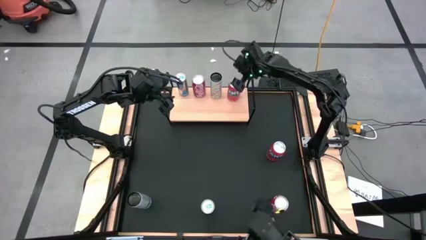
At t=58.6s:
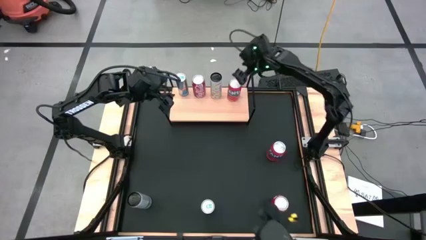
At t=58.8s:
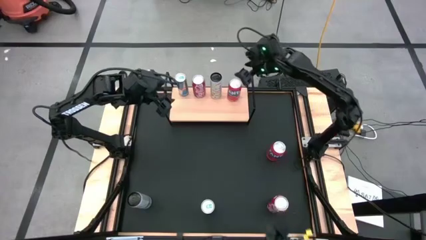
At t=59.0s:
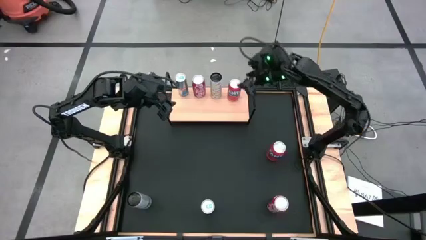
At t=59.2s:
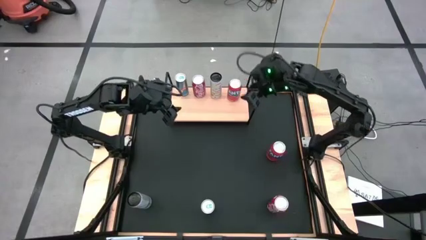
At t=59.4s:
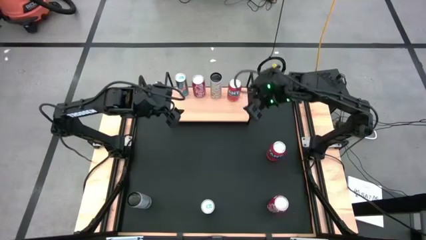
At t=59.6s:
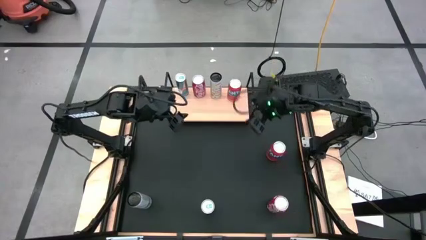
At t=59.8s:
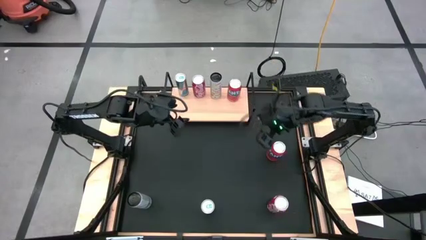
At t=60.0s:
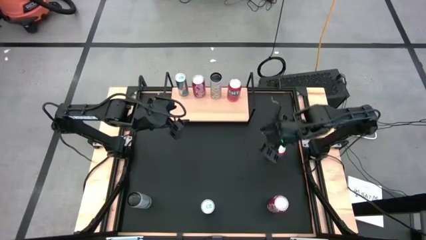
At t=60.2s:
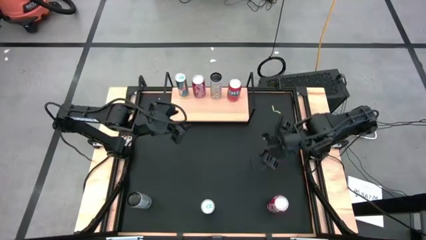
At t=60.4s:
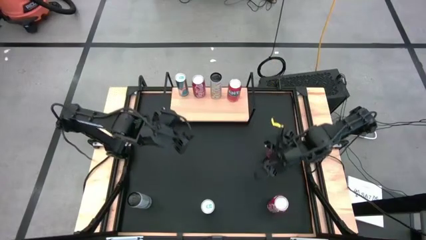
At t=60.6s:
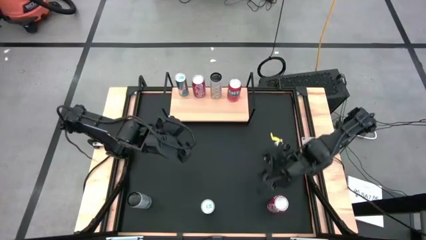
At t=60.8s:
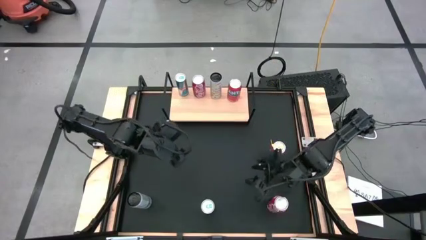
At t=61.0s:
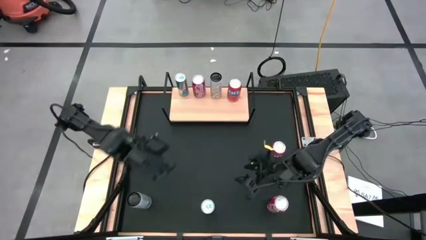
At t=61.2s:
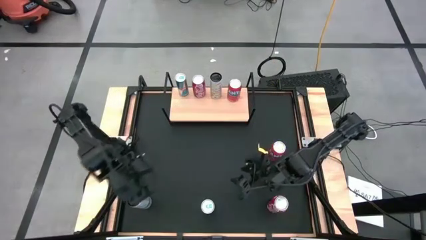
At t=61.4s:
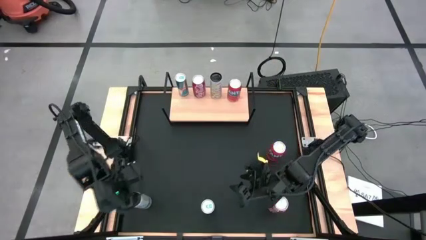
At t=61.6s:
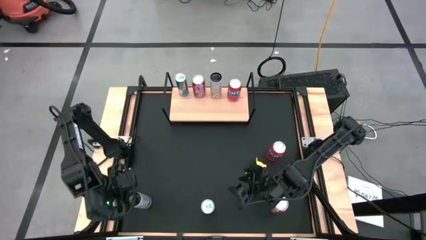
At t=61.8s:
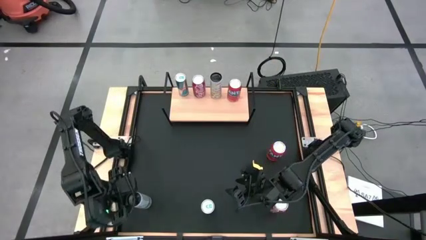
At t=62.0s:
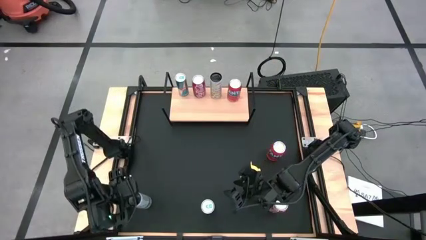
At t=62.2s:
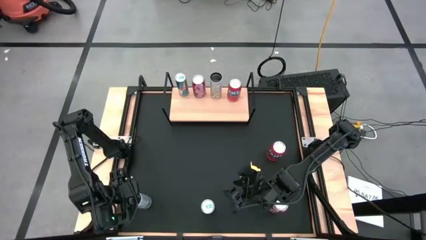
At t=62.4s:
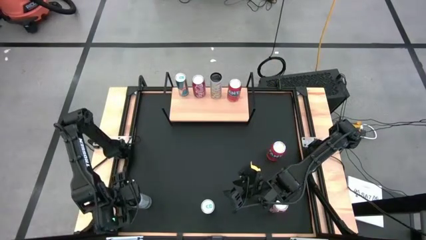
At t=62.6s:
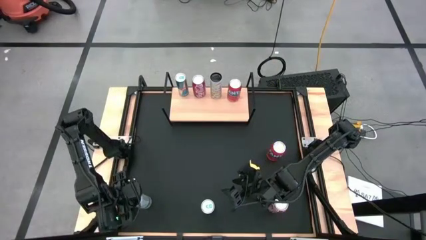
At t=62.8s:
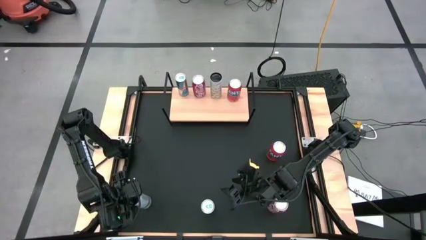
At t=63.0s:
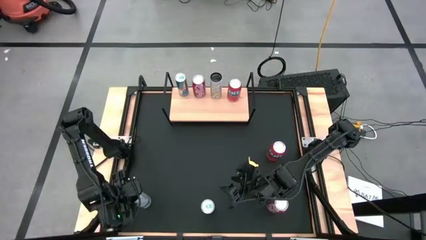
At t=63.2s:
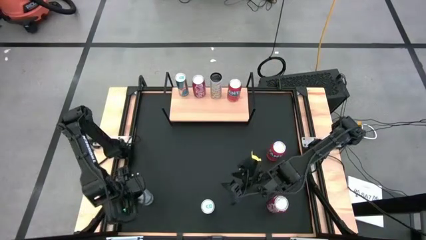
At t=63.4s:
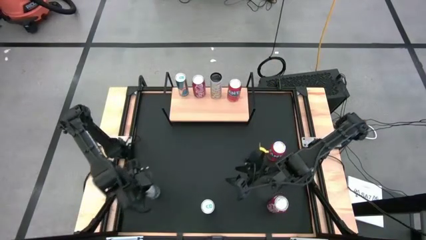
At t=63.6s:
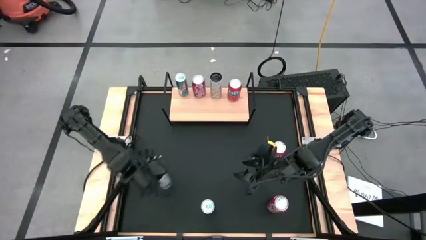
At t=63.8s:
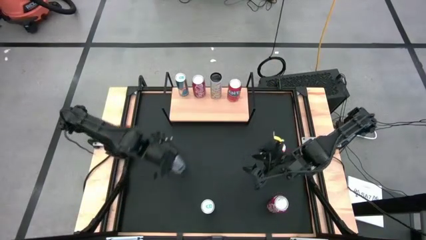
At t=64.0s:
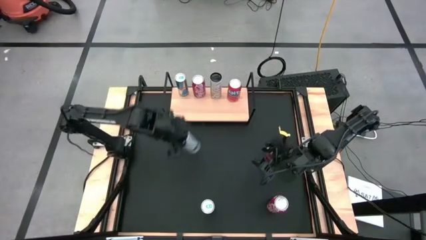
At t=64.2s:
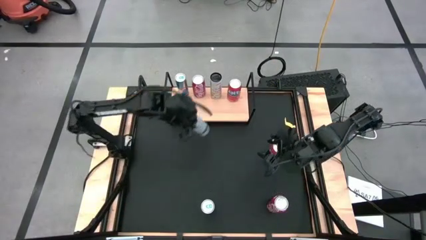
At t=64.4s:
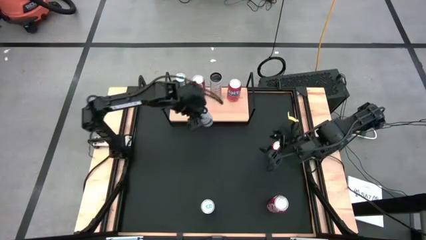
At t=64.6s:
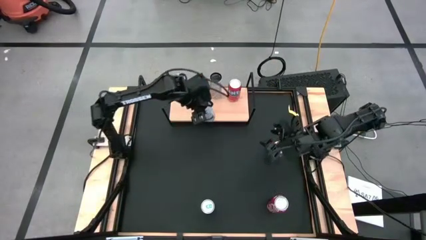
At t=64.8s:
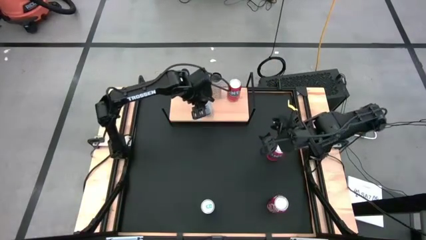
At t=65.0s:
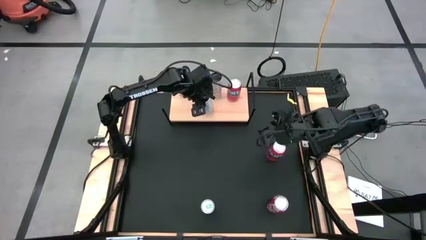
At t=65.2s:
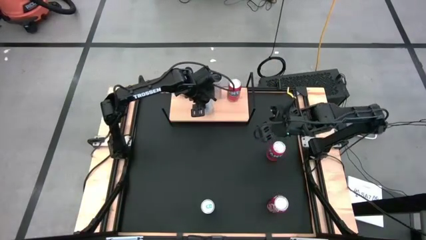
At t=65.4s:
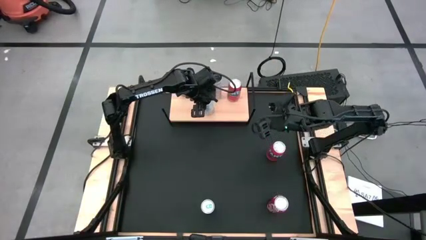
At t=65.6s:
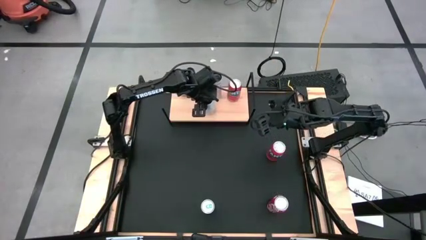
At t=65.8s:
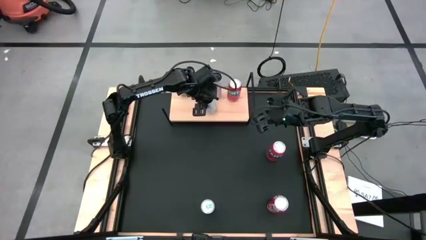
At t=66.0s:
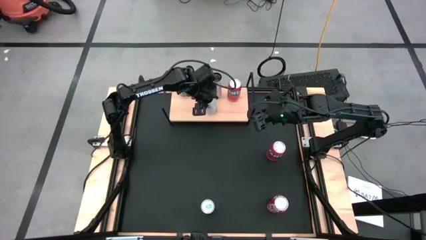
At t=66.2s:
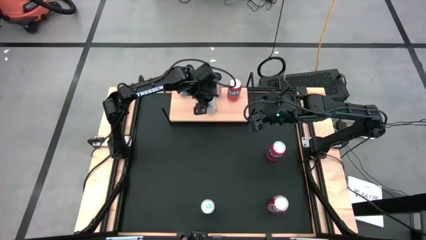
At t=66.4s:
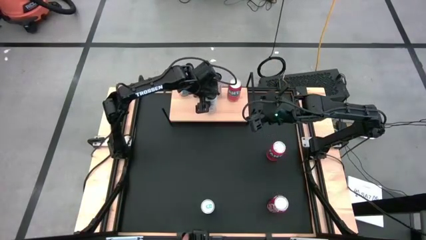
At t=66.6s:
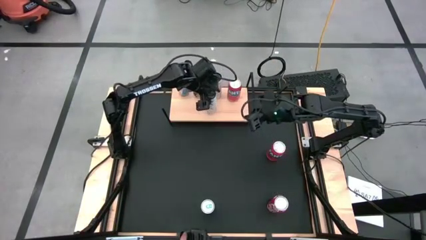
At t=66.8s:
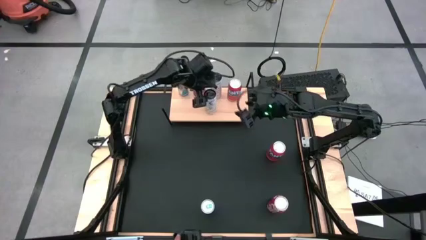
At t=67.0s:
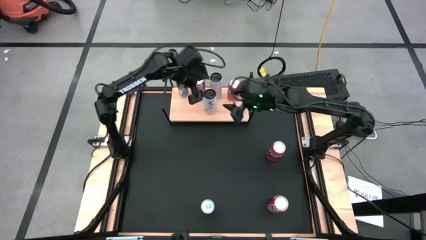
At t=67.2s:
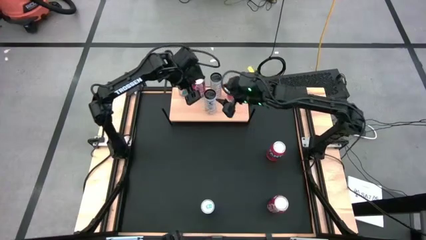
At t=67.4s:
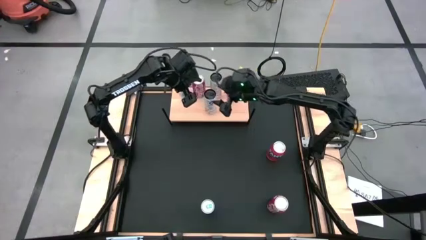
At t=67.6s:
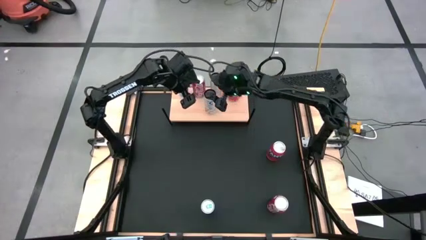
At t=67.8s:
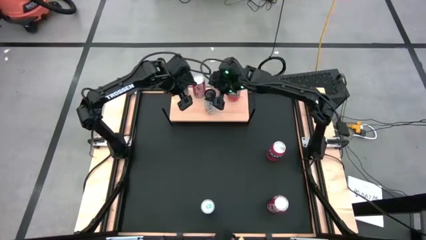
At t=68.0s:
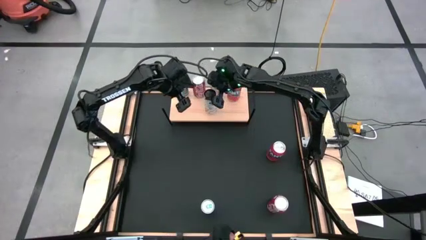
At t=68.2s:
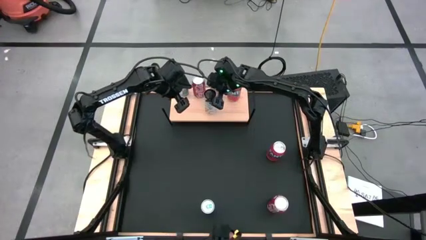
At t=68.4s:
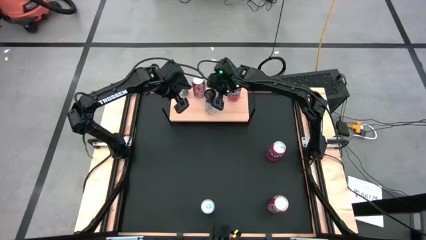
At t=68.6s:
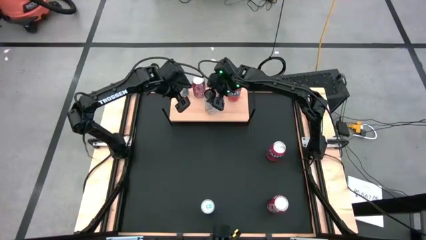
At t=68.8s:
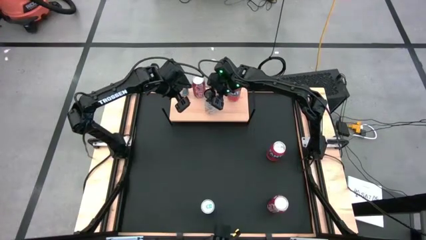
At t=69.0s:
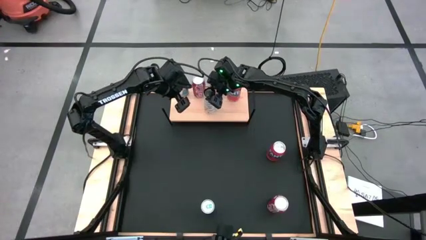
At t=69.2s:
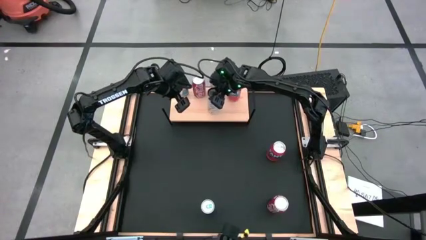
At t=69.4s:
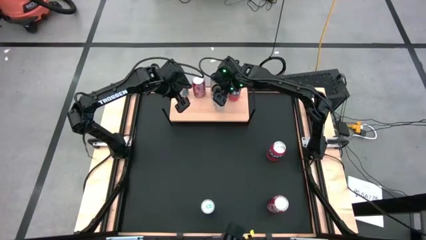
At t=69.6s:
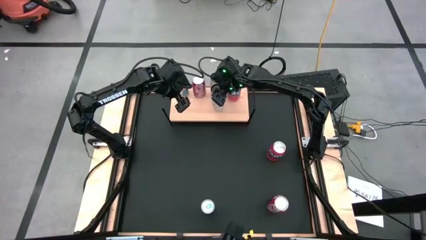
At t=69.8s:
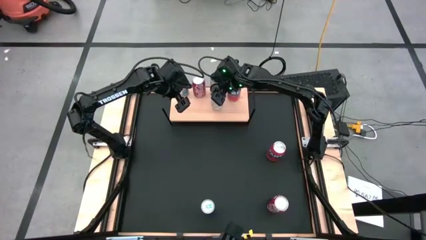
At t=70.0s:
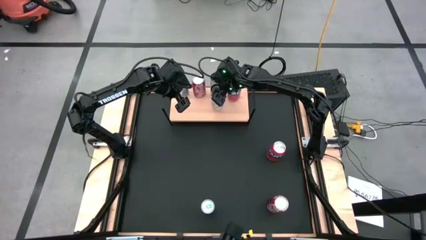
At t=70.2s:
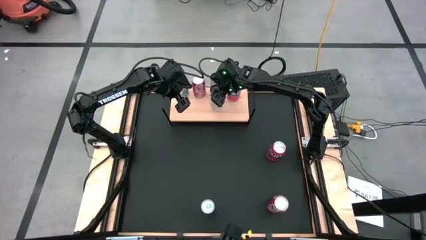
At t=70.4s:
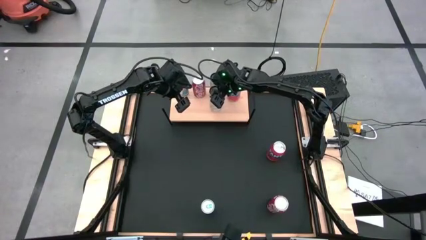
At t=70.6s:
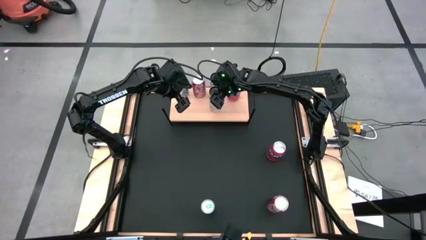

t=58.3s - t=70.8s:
Task: Place canned beverage on shelf
Put the white yellow soda can aligned with the other white yellow soda can on the shelf

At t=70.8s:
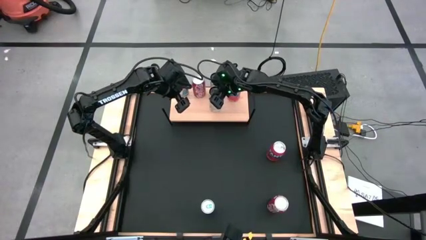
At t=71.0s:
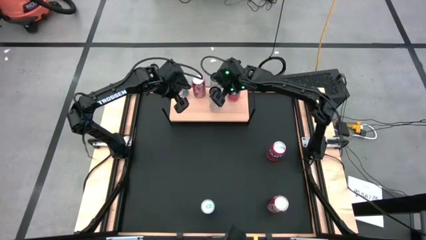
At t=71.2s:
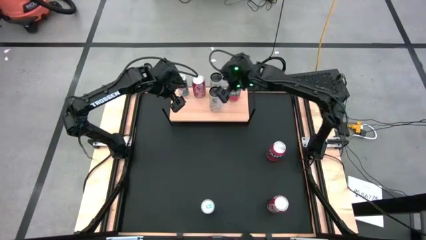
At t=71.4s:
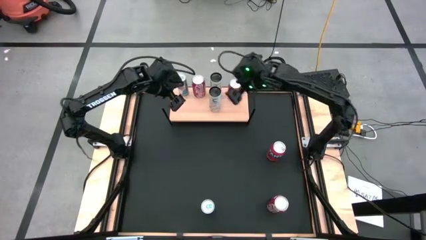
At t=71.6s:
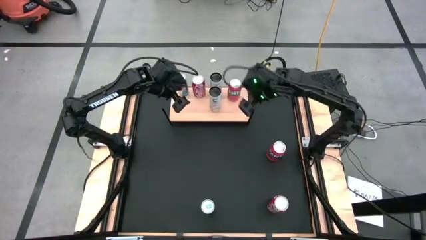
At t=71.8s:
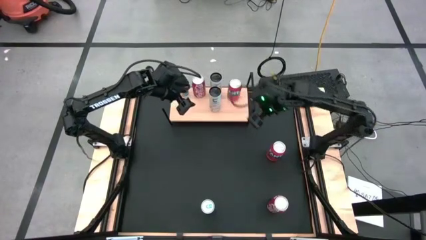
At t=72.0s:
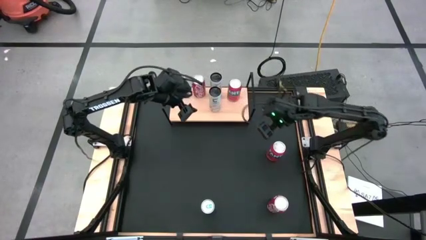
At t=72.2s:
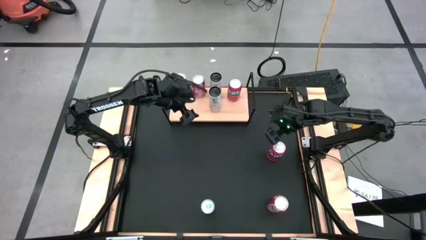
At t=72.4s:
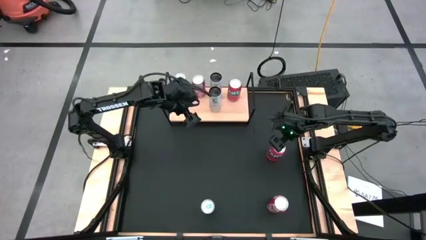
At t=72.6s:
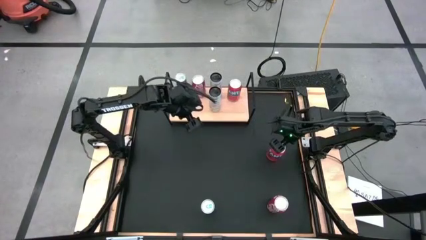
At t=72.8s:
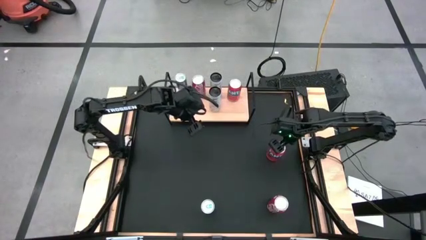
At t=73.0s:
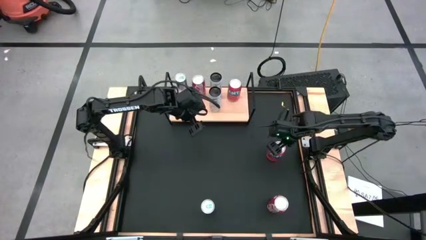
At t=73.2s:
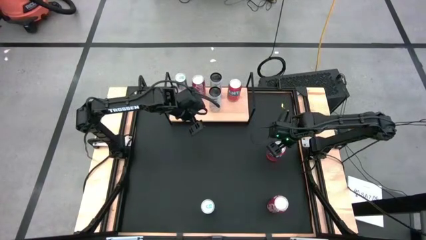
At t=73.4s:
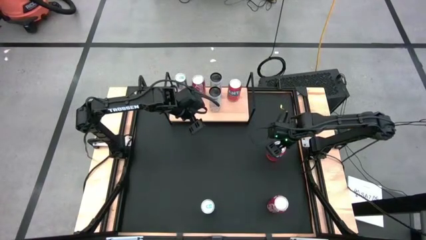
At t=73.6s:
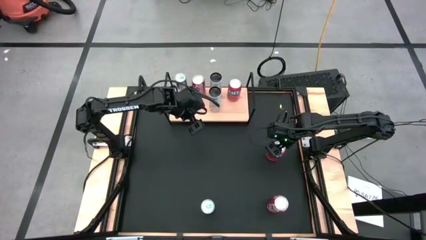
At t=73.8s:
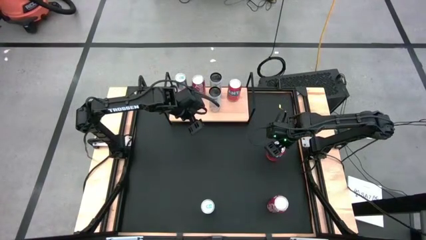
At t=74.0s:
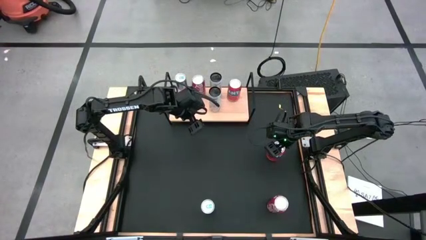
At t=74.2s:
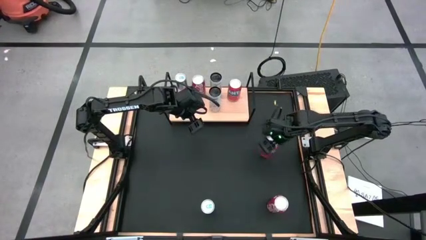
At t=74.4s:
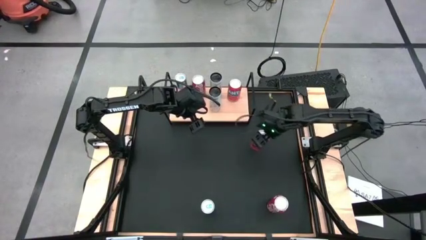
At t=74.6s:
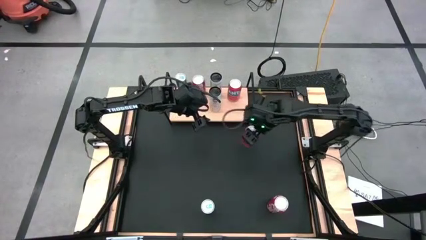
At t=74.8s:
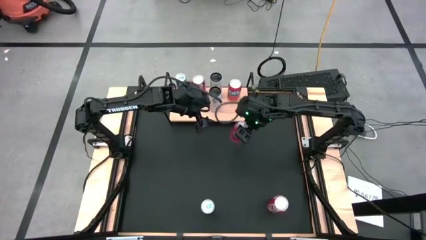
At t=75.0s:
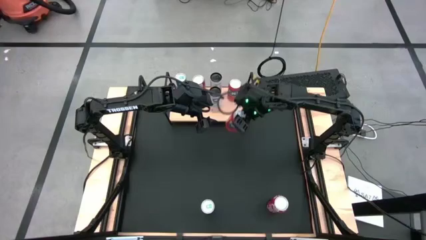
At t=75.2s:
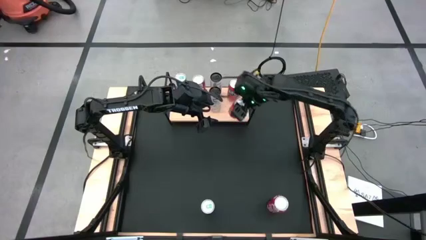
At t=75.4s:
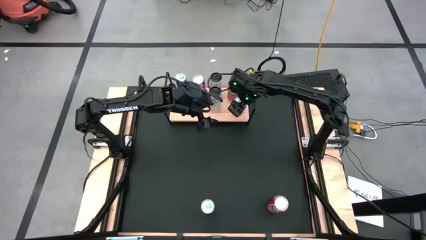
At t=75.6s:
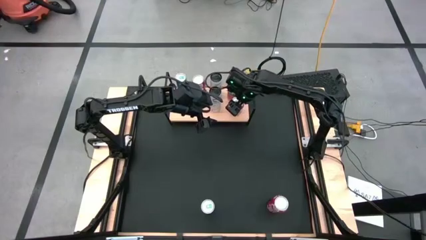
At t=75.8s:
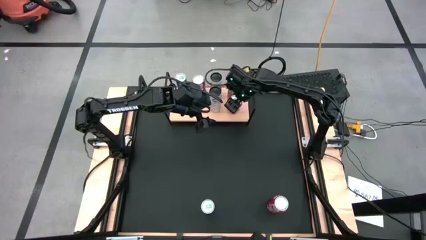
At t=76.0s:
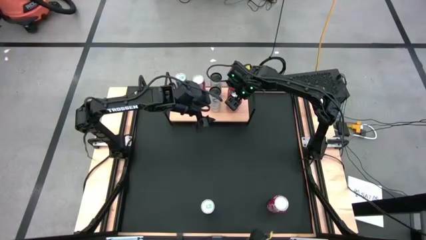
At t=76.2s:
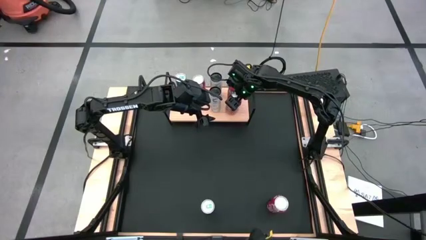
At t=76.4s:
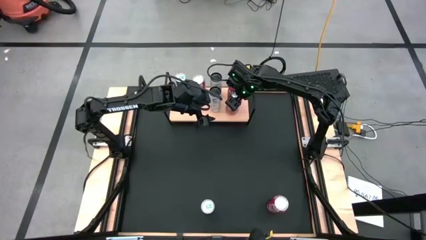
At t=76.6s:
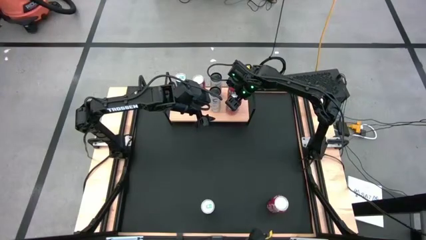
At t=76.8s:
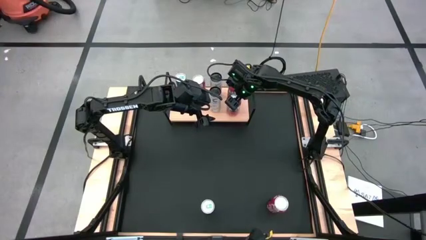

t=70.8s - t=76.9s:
Put the red soda can aligned with the other red soda can on the shelf
